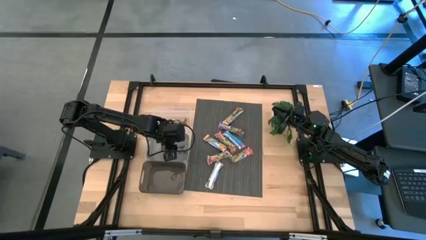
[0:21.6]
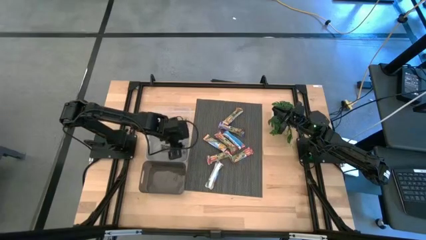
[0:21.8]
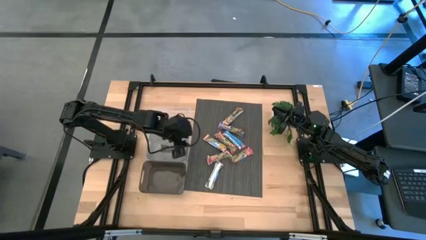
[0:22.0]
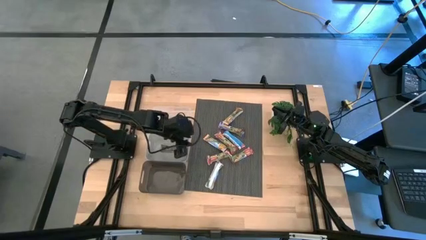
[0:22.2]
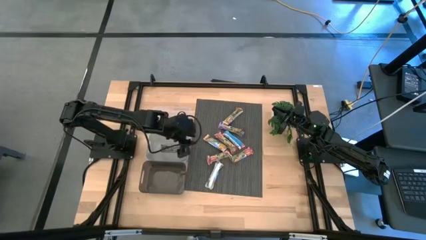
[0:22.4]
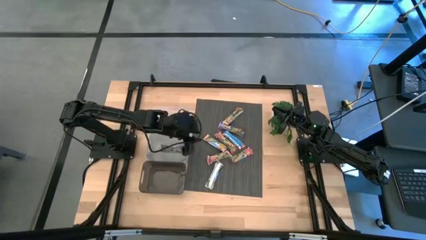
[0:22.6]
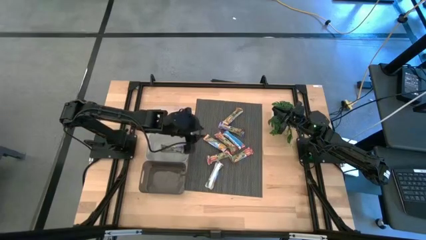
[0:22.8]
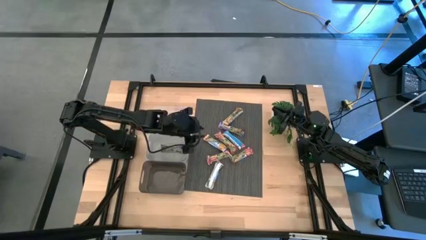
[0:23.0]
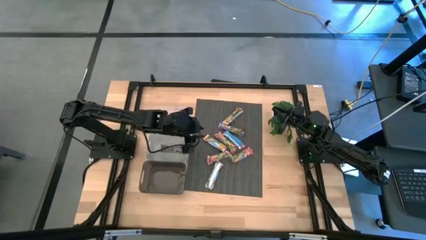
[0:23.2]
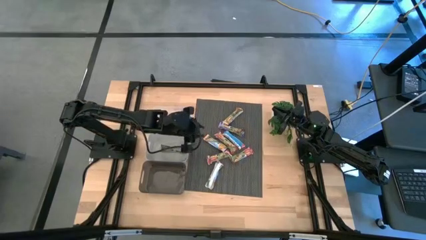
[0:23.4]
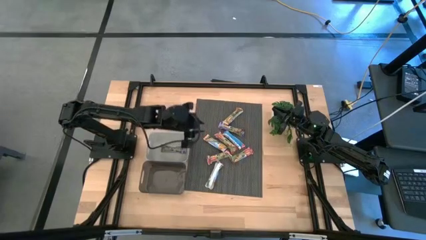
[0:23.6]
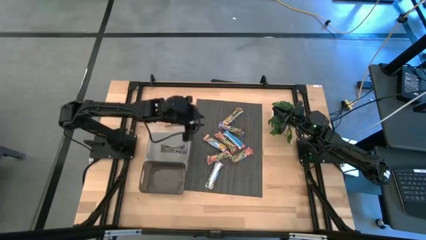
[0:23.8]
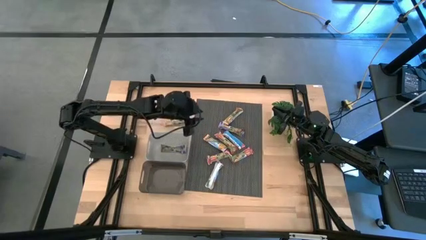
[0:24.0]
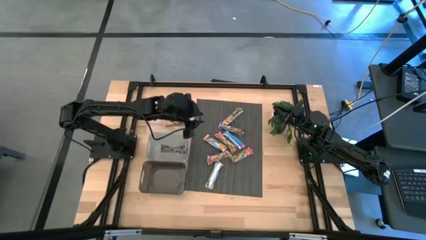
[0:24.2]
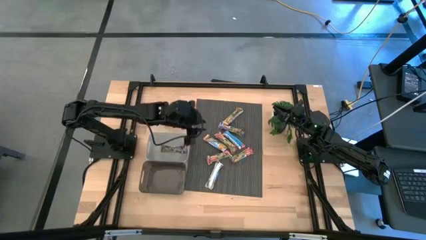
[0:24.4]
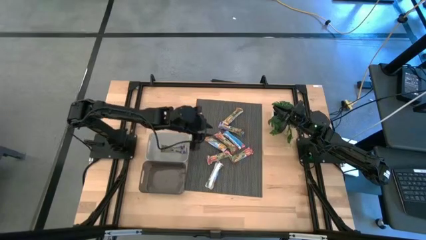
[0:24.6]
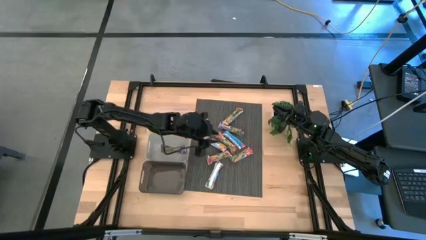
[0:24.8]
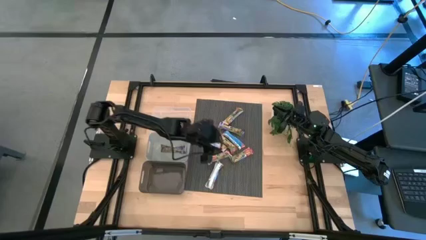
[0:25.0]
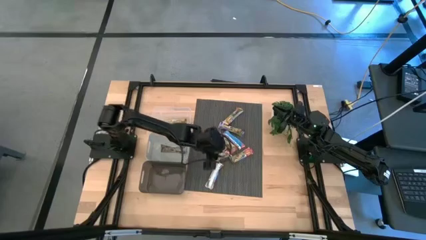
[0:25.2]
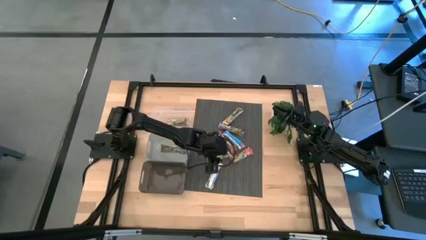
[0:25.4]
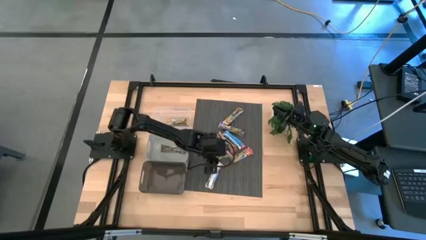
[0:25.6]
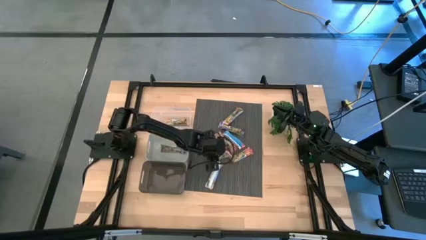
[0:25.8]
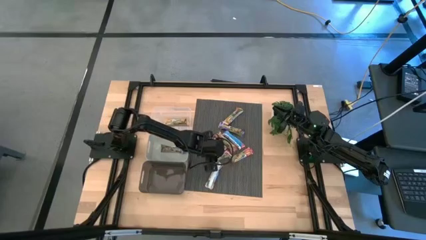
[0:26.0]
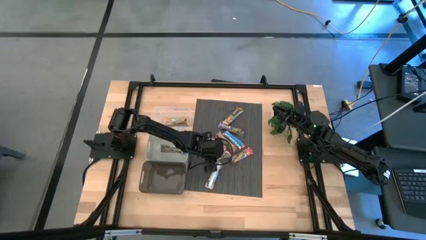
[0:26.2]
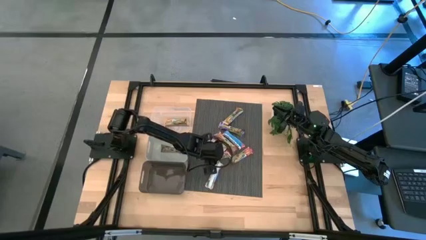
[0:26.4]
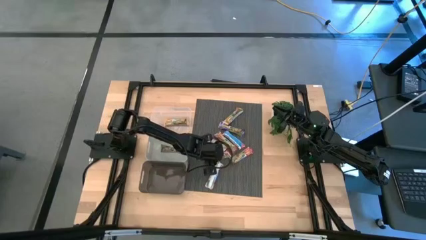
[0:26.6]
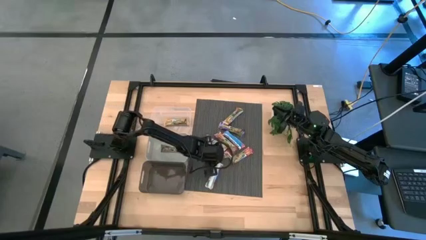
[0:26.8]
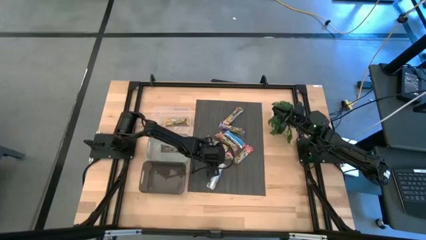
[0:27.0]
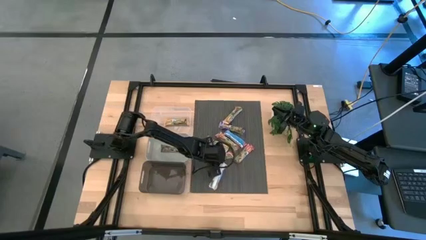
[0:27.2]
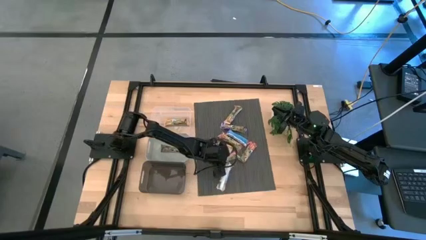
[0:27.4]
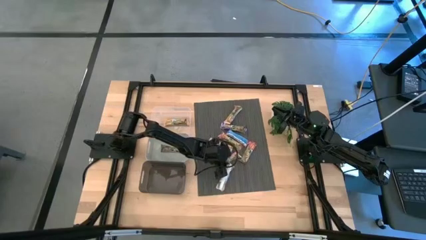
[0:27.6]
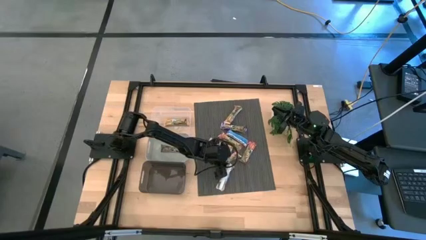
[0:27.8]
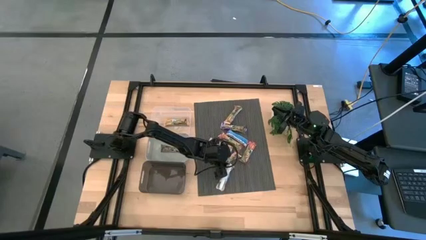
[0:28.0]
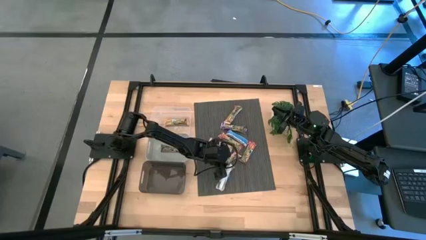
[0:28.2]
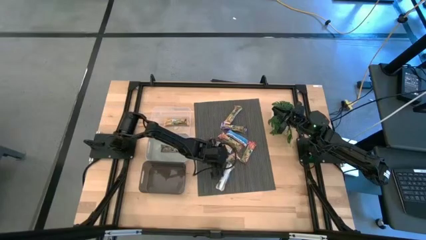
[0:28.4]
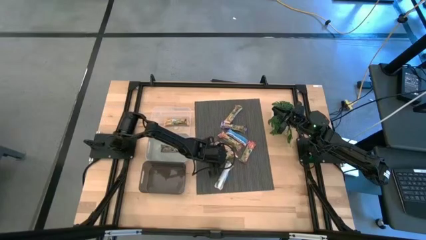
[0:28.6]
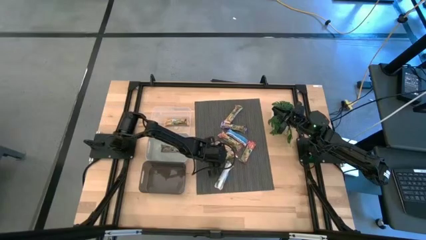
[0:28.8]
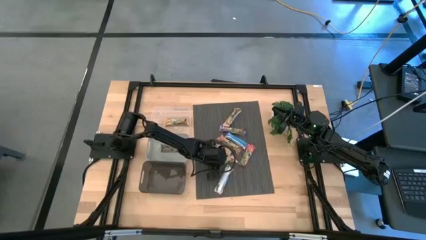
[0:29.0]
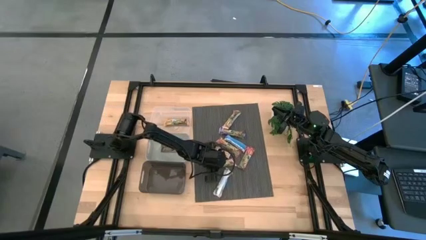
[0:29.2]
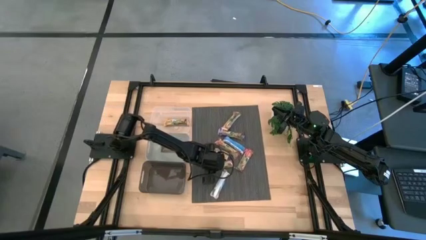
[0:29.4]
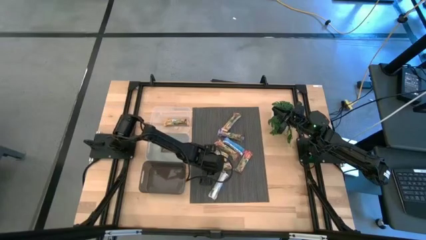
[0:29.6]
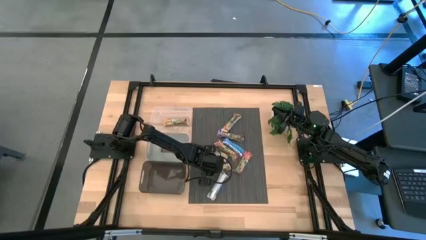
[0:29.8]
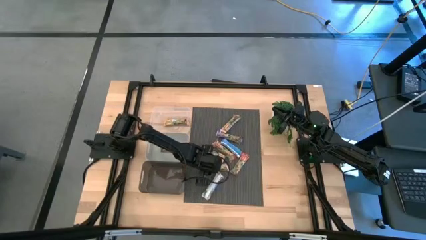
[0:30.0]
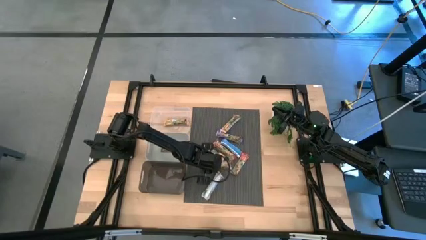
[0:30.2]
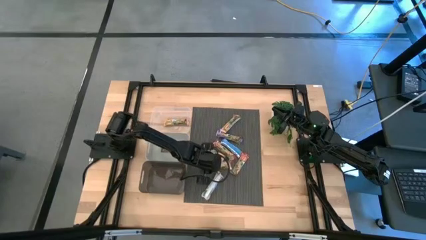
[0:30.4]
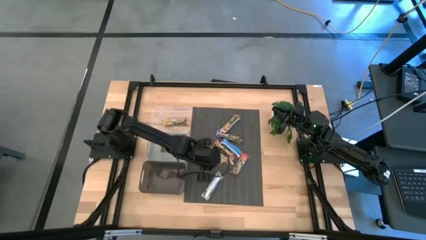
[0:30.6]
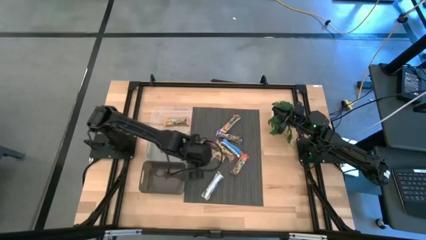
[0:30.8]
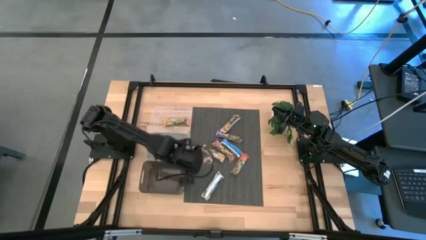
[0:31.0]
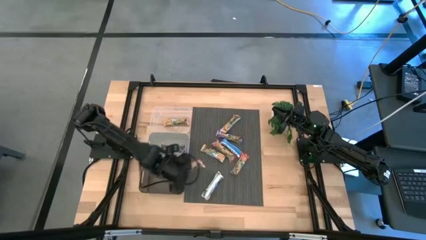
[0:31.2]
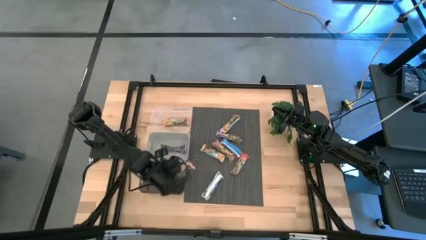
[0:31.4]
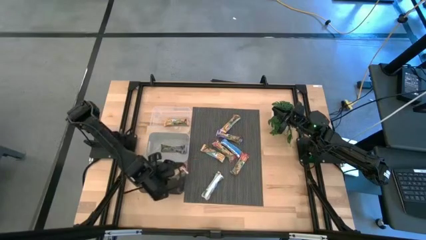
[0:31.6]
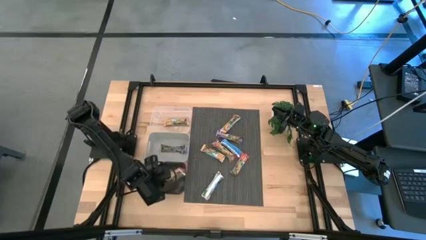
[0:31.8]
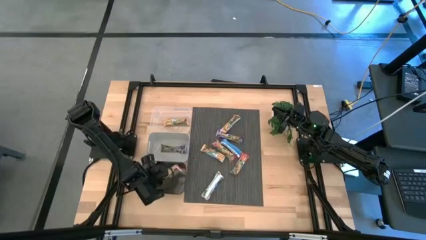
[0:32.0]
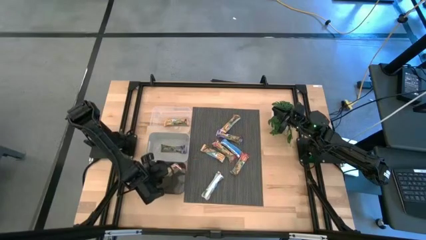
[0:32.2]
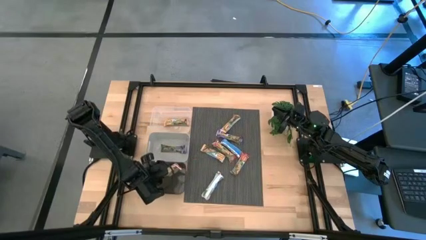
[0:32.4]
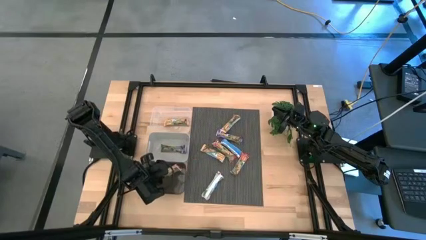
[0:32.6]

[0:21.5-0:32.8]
Task: Pick and place Granola Bars by type
Put the red granola bar into the black bin
